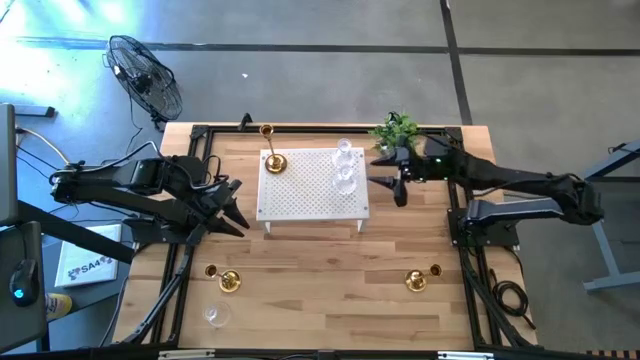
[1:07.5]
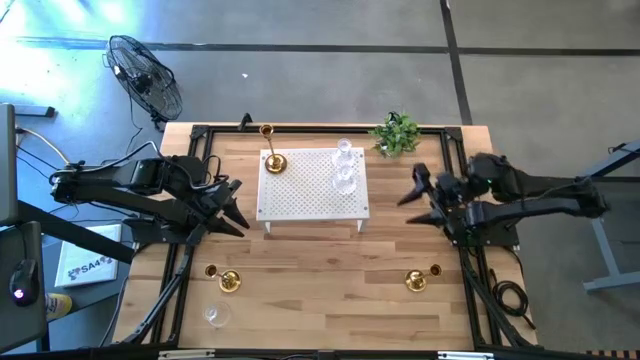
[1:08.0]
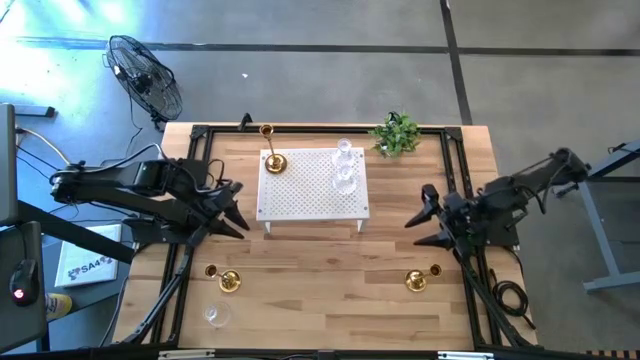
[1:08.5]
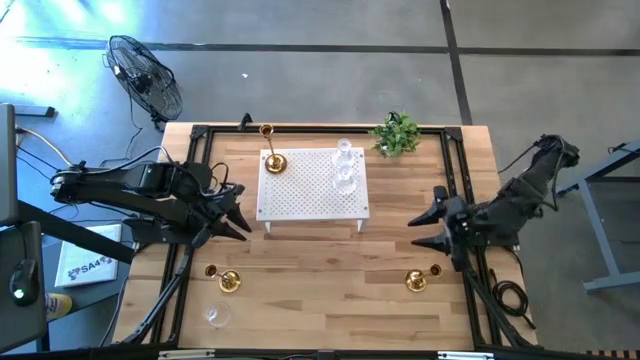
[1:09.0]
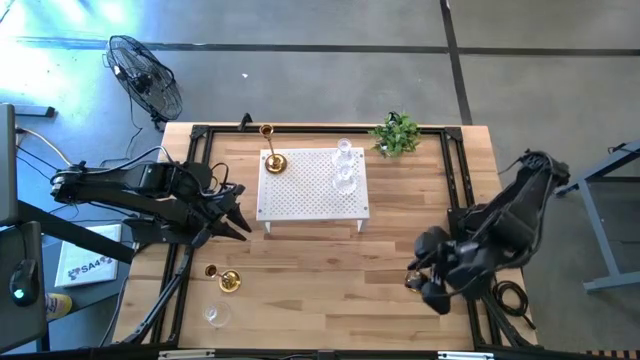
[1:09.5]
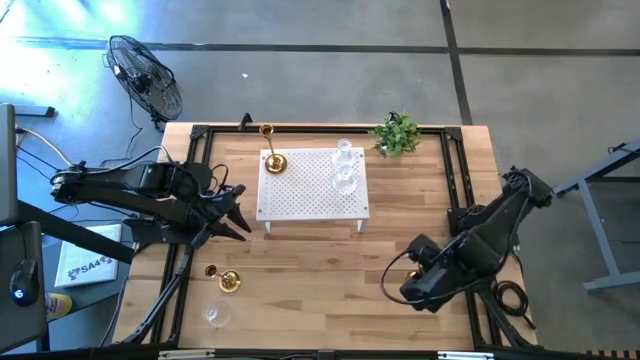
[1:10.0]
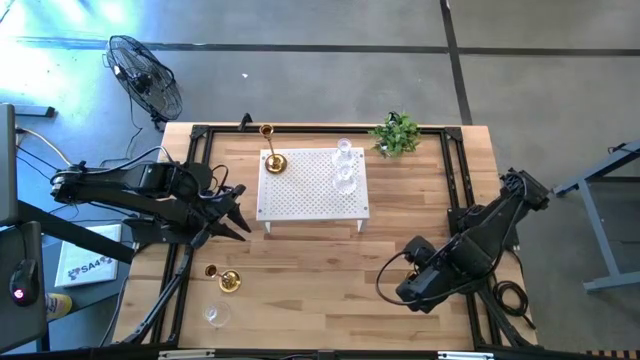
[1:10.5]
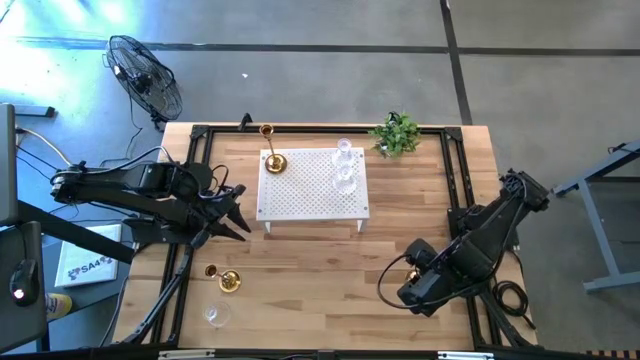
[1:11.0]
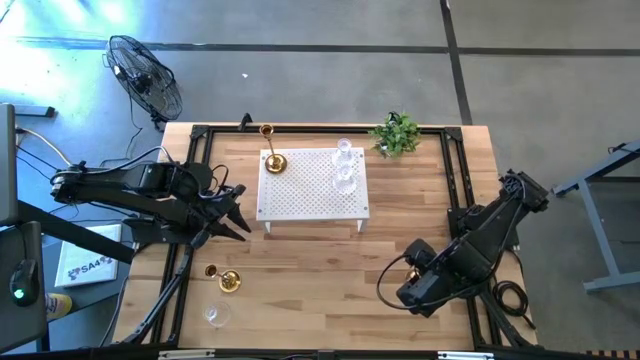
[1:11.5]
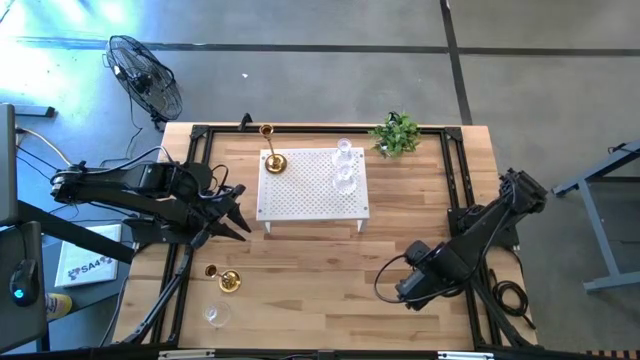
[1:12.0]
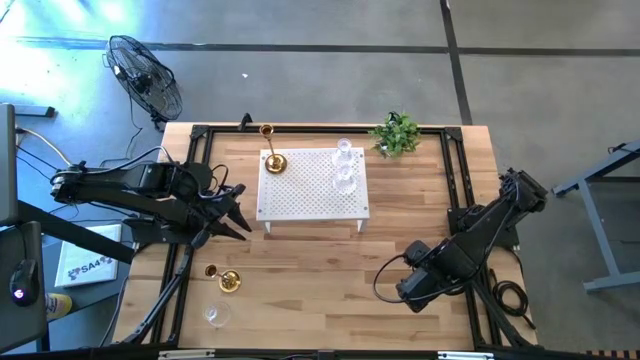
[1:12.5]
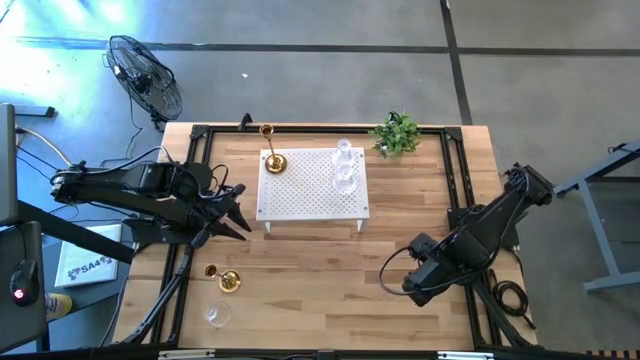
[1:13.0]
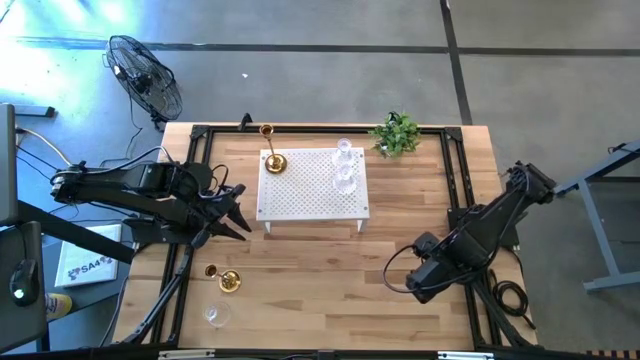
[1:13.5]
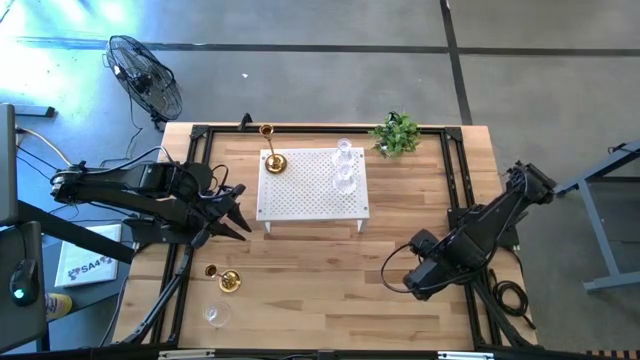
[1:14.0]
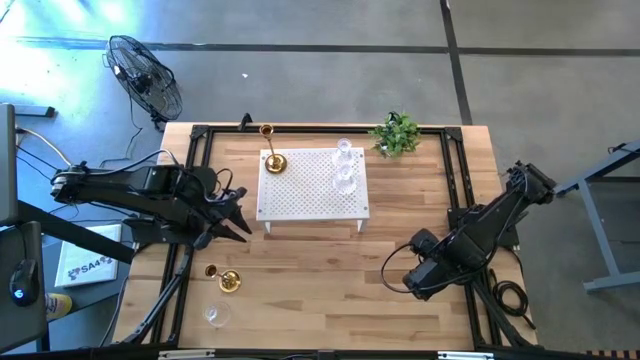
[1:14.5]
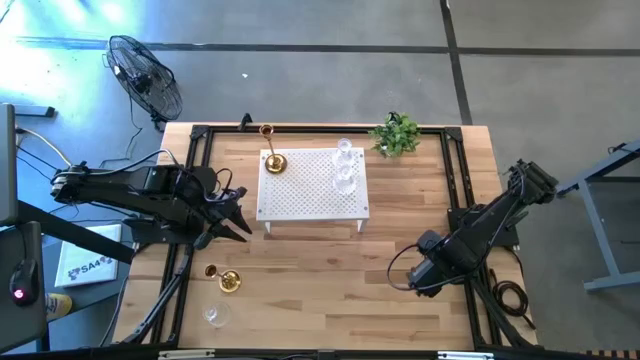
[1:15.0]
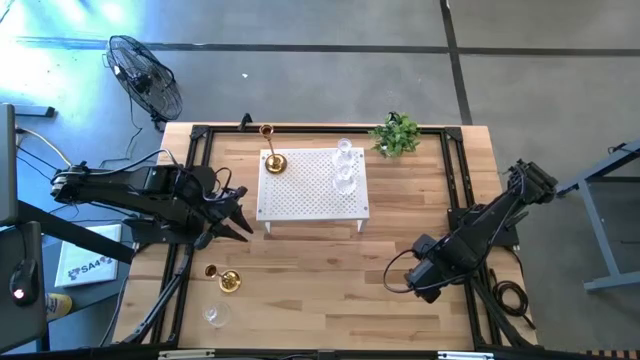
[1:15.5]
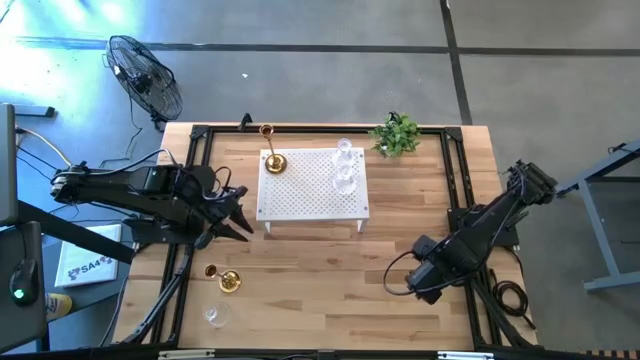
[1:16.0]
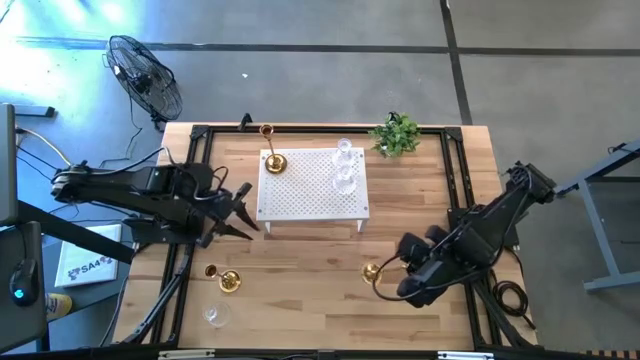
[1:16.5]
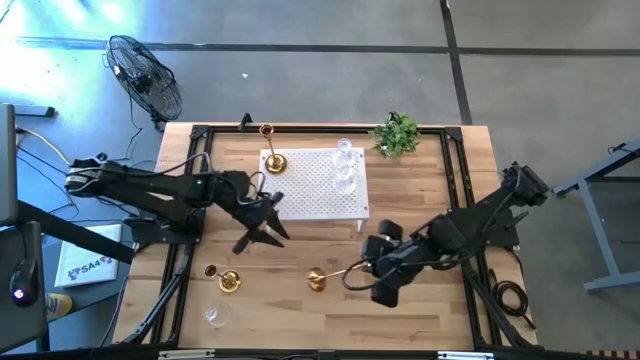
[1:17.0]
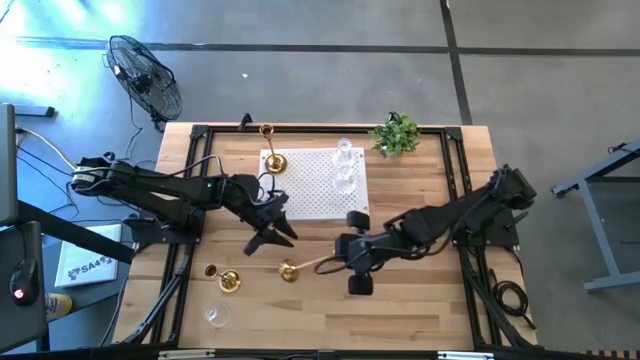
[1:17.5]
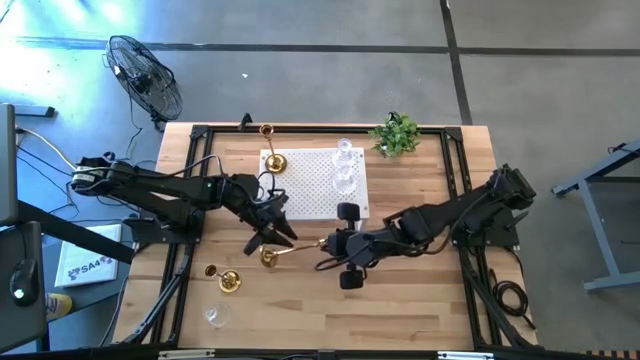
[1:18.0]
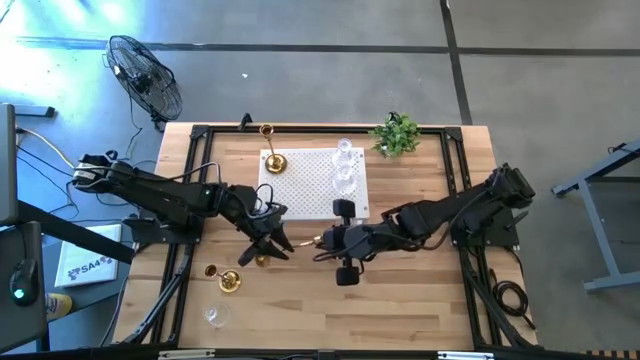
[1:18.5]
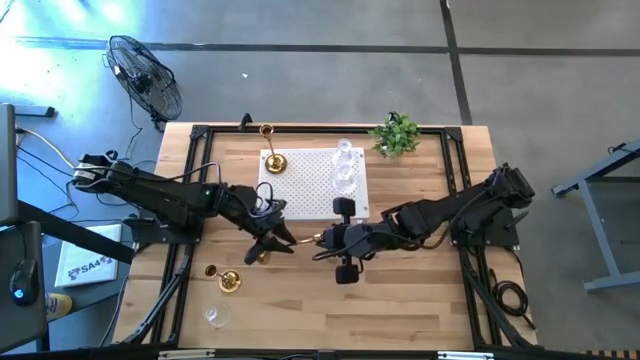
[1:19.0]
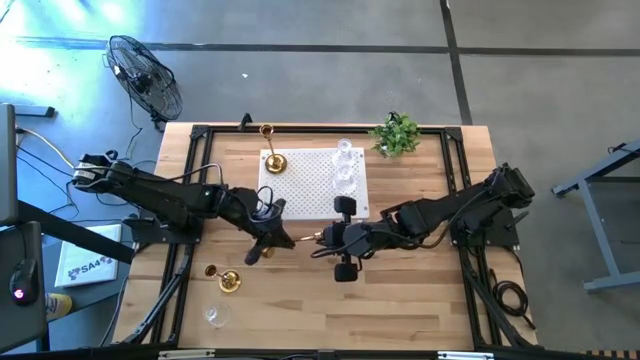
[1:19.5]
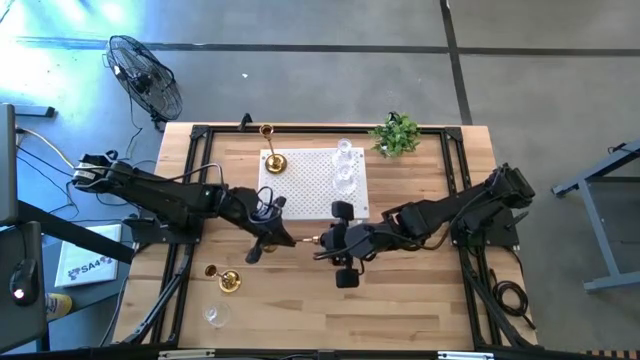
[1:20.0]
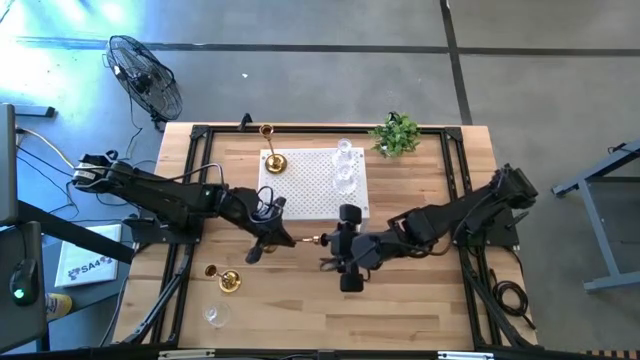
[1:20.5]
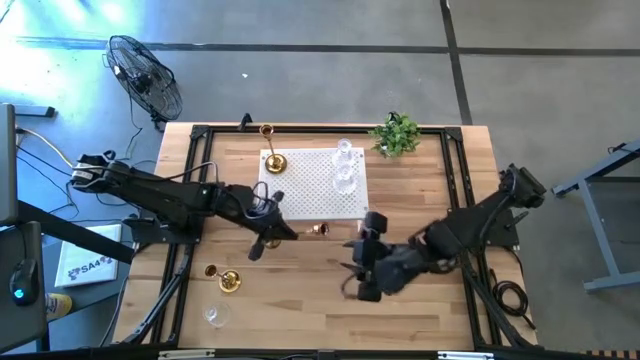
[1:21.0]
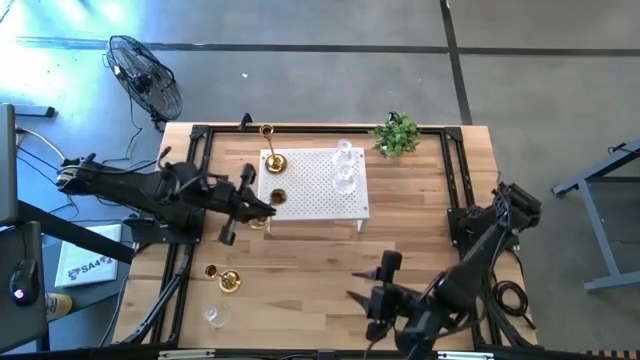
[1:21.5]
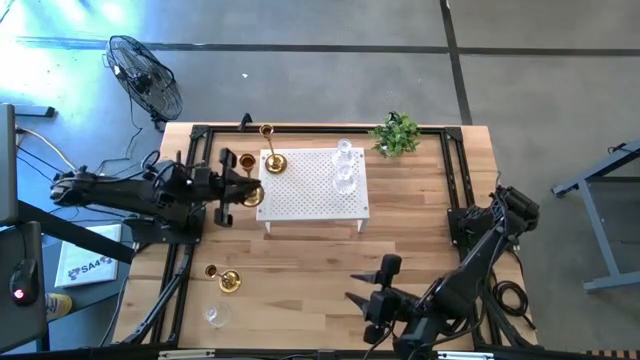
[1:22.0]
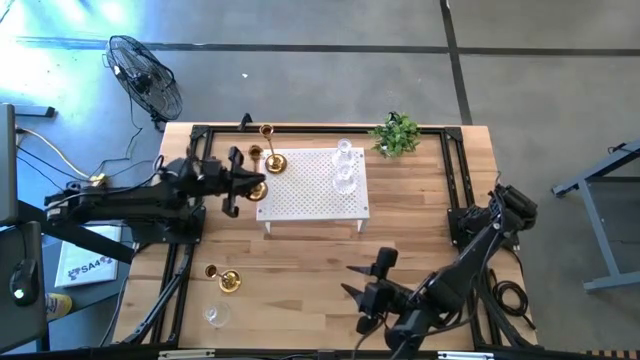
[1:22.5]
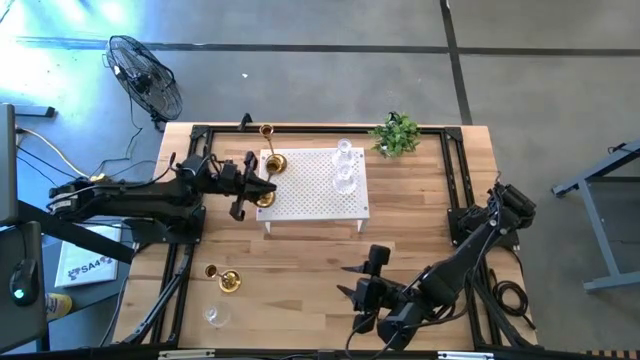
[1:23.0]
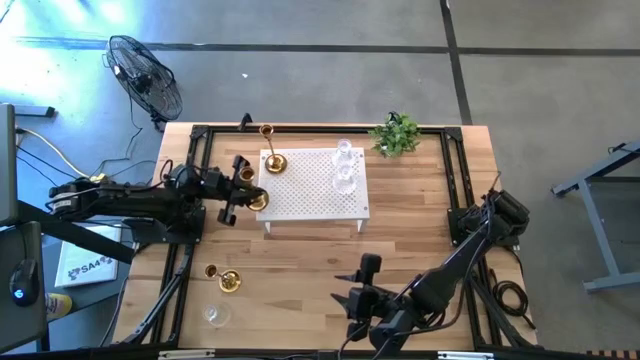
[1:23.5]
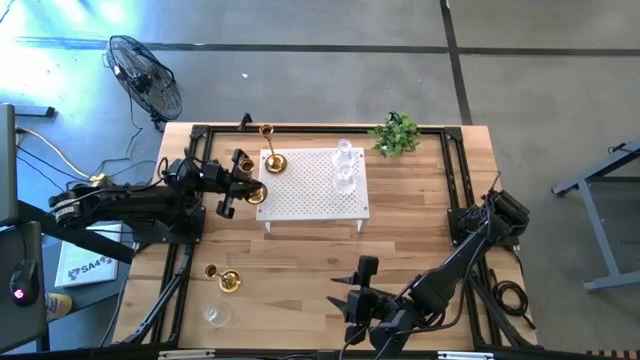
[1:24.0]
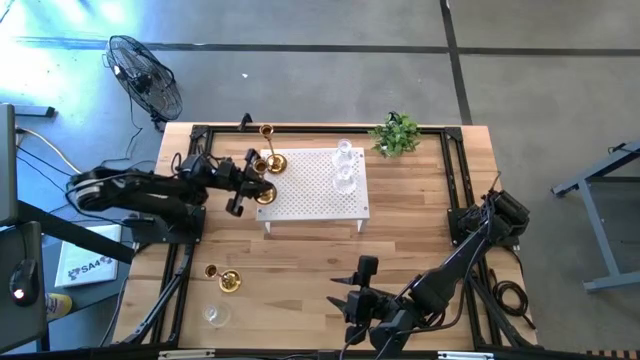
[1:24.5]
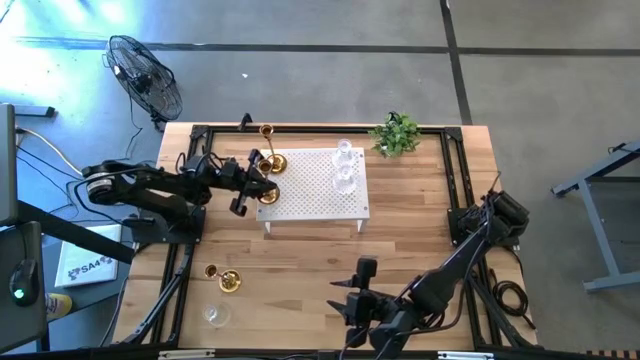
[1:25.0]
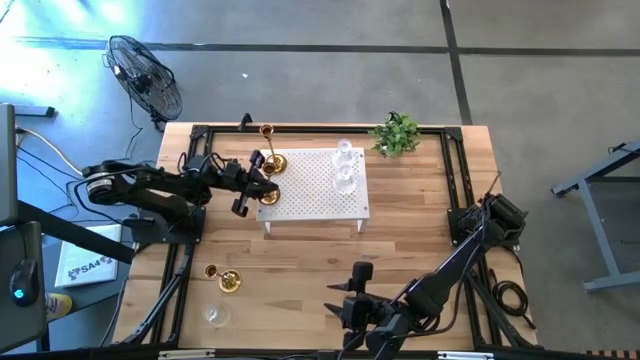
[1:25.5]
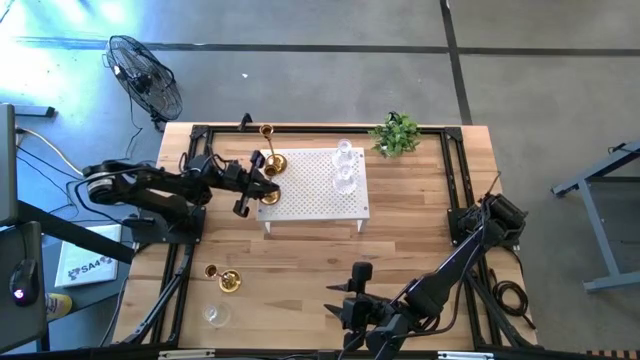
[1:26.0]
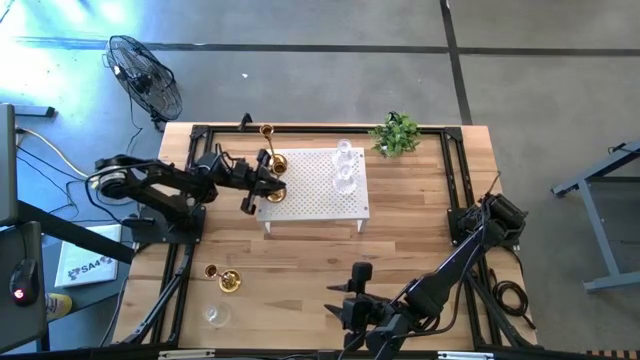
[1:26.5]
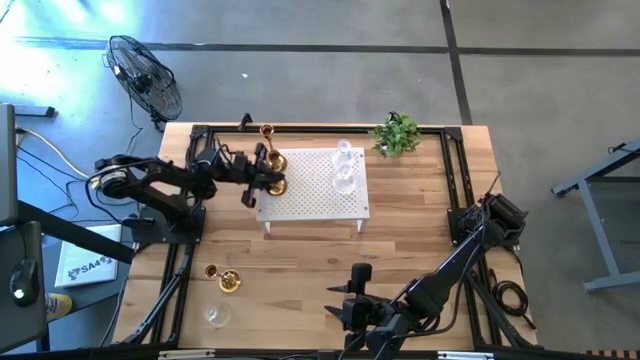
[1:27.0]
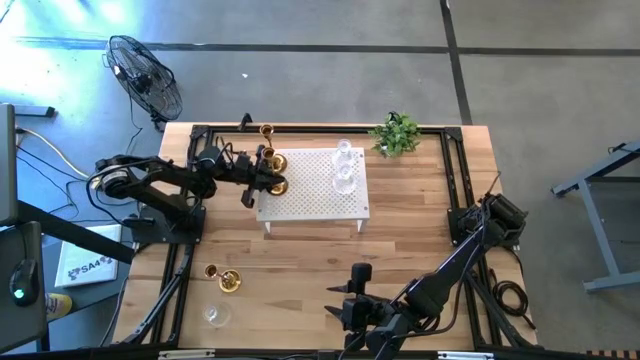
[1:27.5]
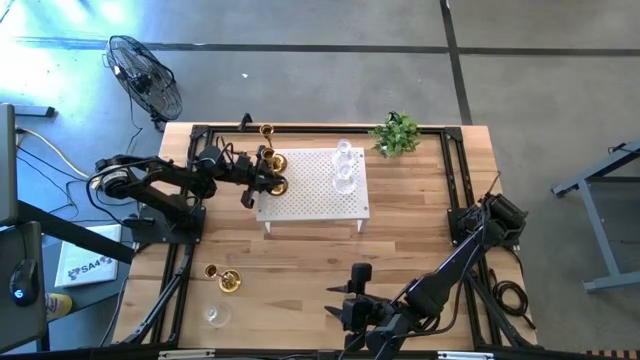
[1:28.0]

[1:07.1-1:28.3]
Task: Pick & Place candle stick holders
Put the right gold candle holder on the shelf aligned with the other gold candle holder
